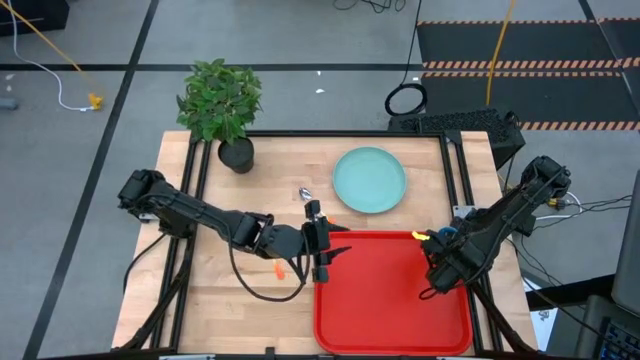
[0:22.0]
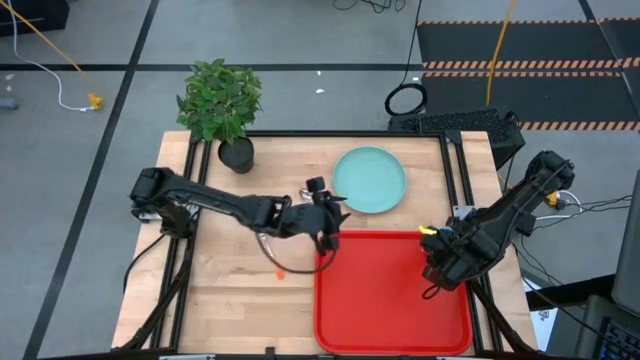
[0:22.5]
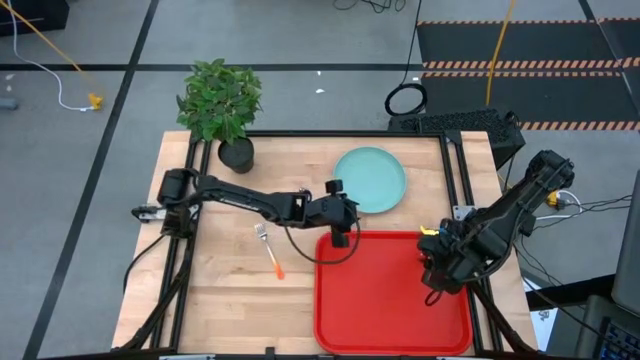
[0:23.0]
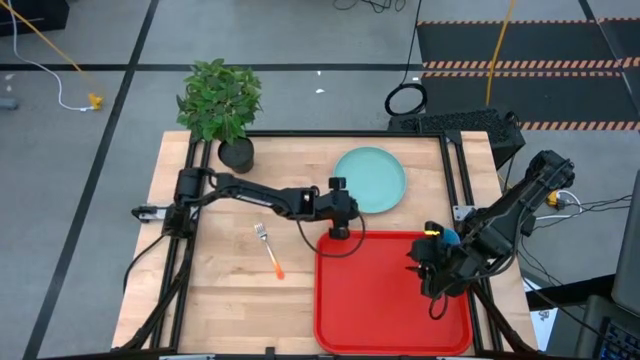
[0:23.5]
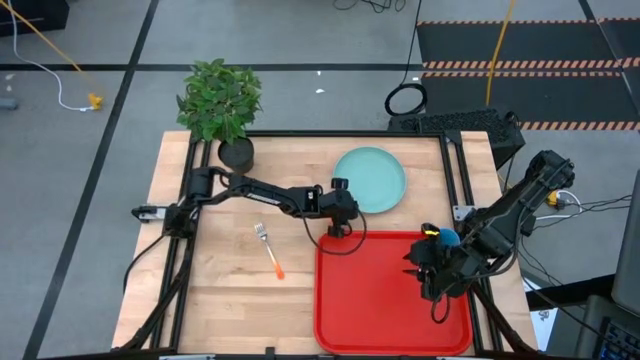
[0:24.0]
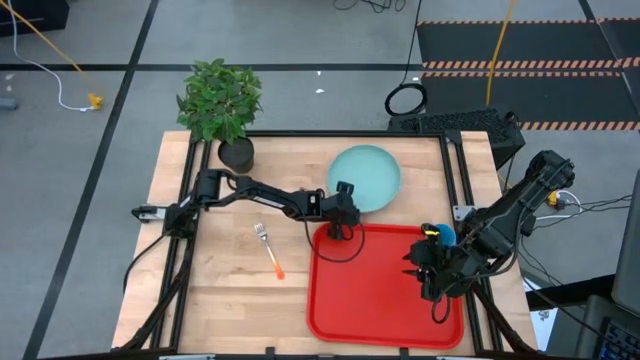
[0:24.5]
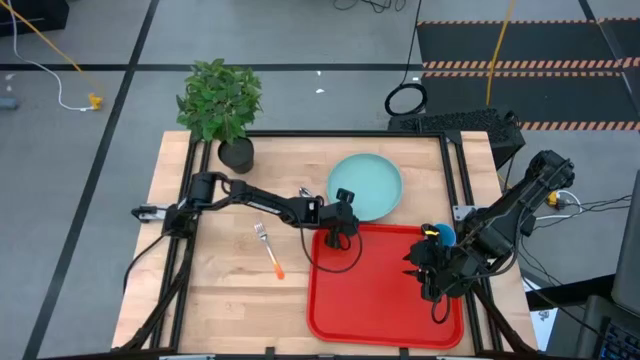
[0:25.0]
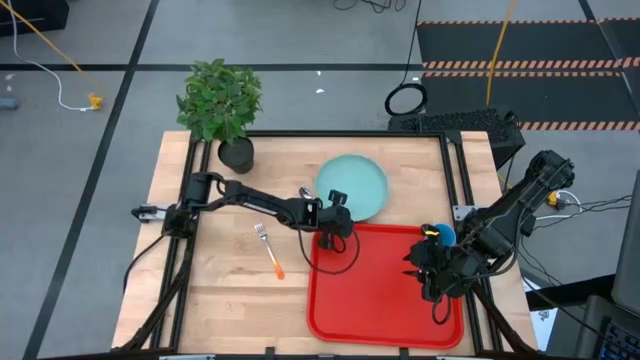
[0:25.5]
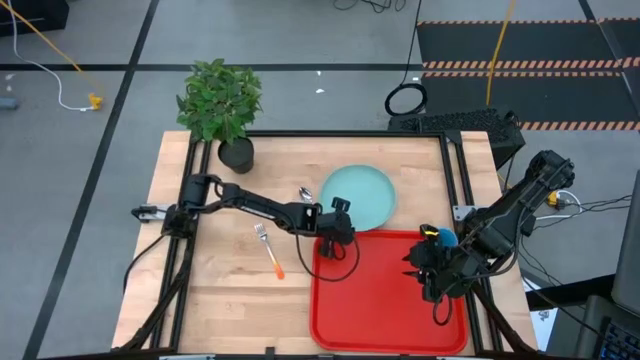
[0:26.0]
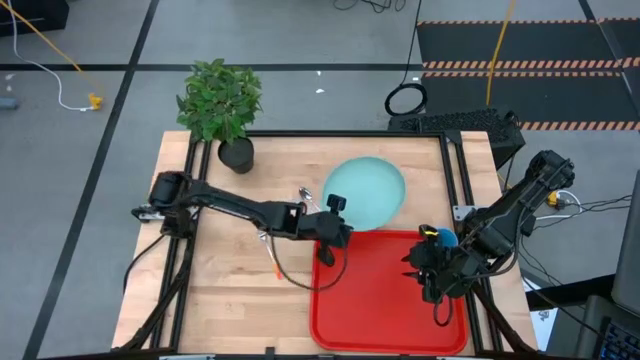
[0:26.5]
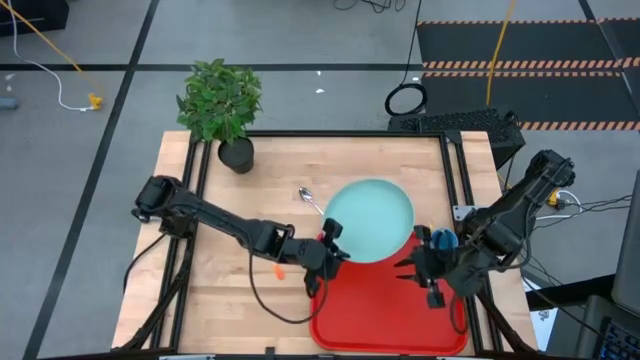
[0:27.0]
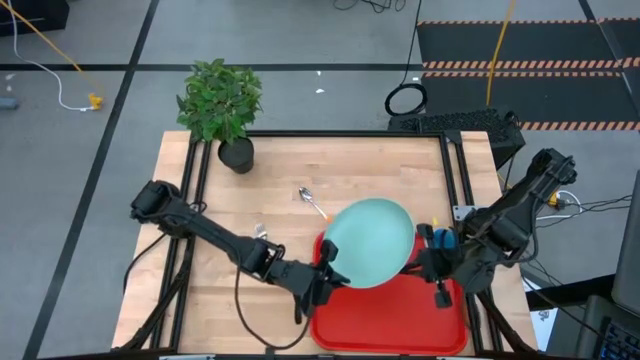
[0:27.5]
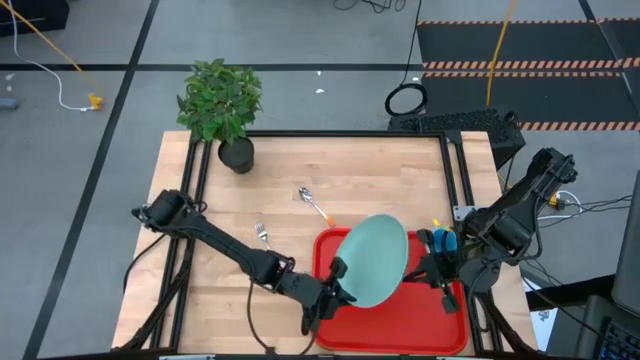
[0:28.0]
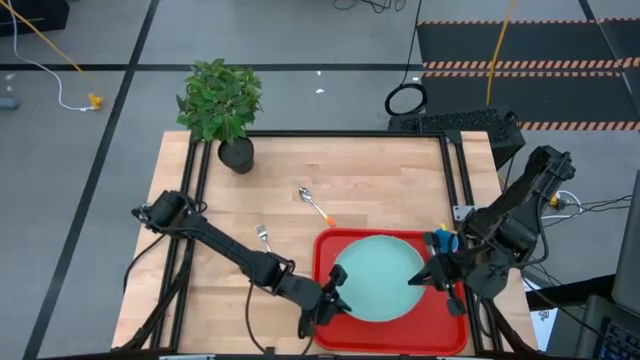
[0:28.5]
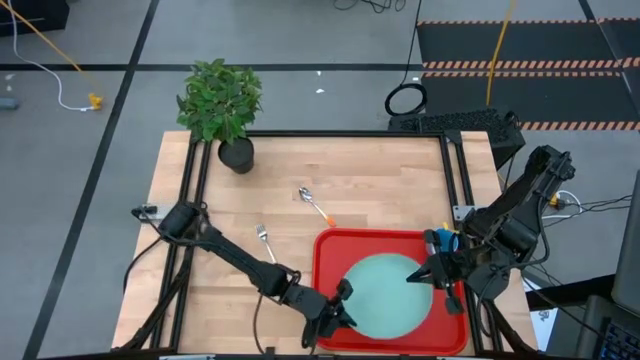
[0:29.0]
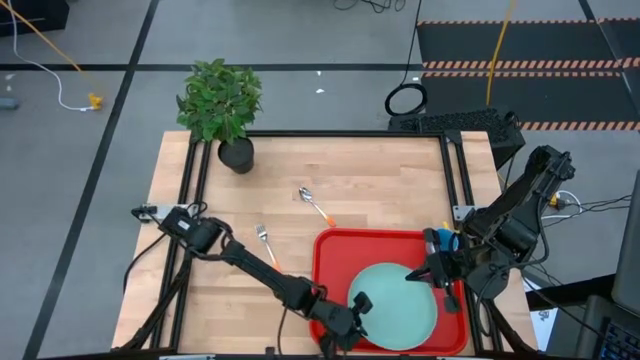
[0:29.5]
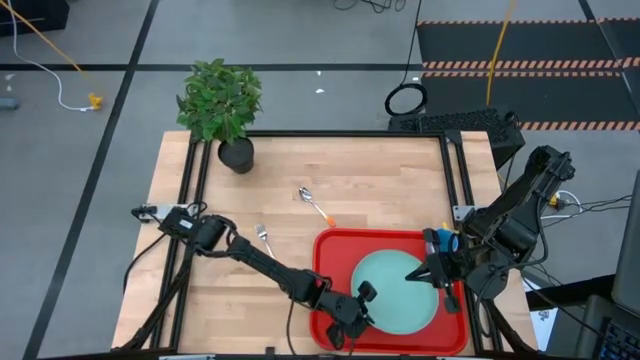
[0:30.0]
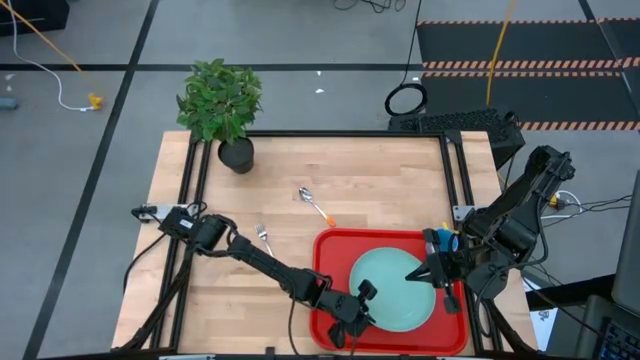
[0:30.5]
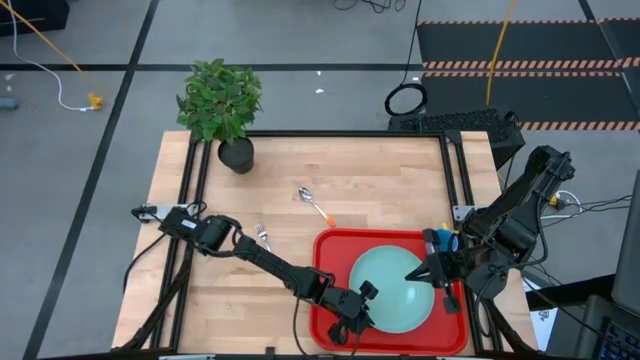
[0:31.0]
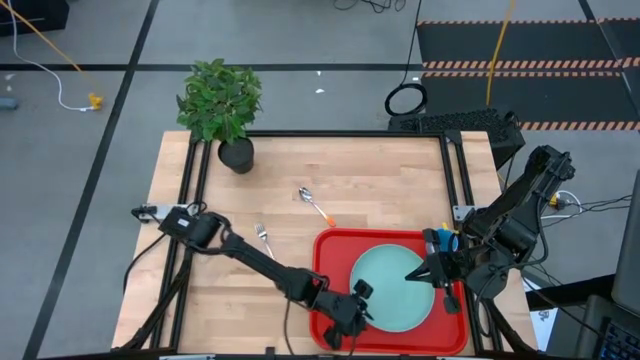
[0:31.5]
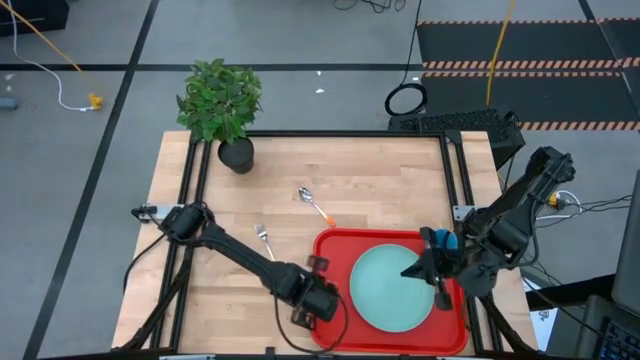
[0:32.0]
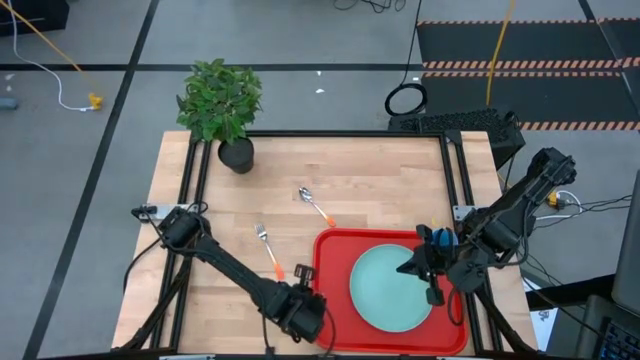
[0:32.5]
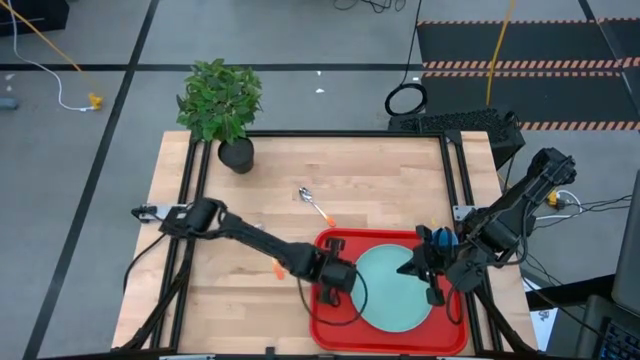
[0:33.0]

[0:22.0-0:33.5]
Task: Pick and place plate/cup/fork/spoon on tray
Put the light blue plate on the red serving tray

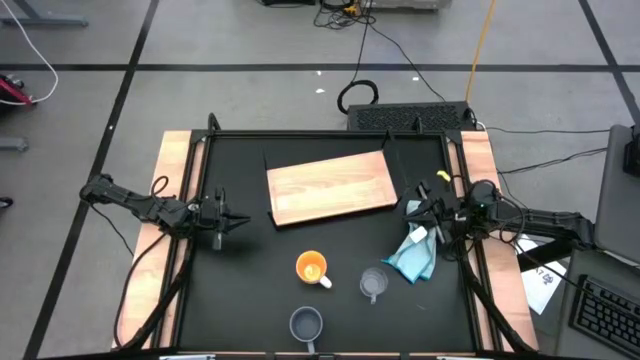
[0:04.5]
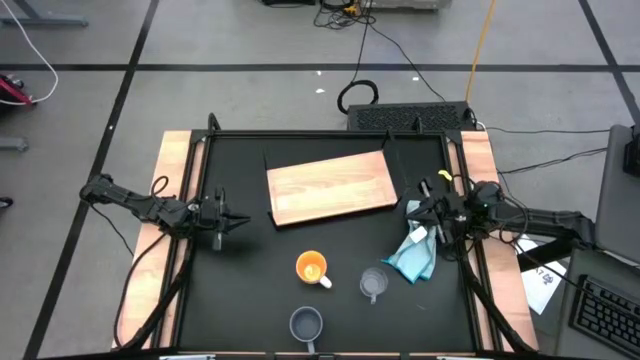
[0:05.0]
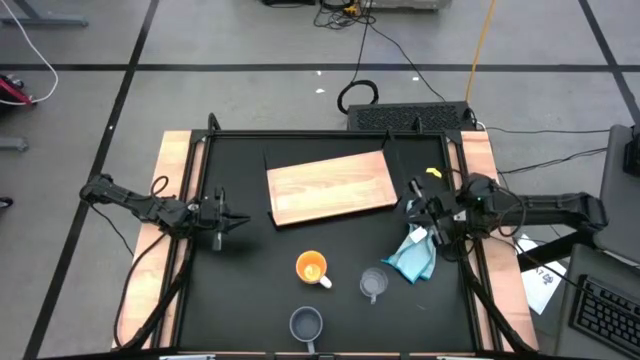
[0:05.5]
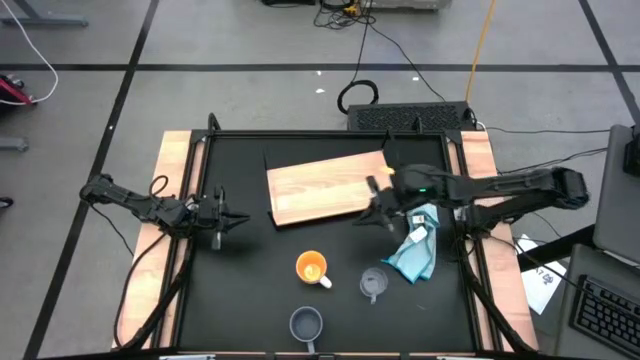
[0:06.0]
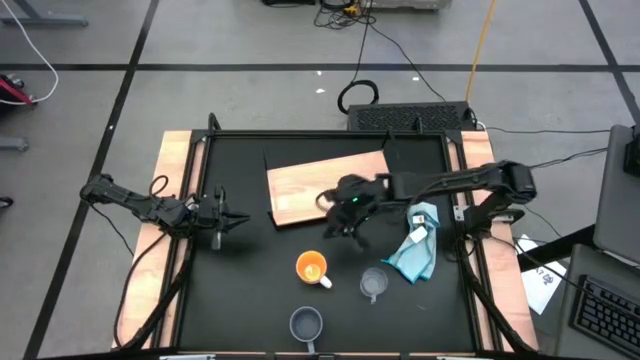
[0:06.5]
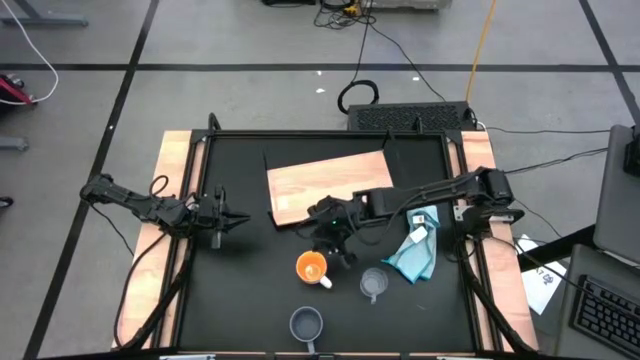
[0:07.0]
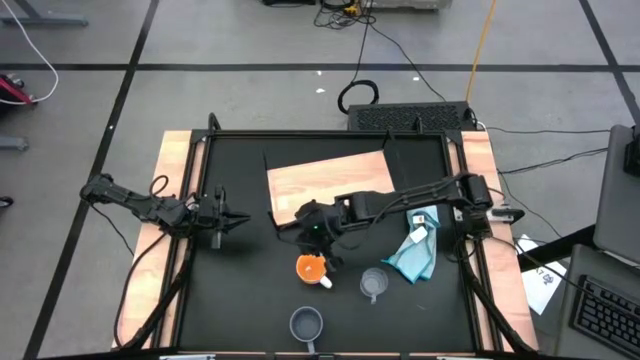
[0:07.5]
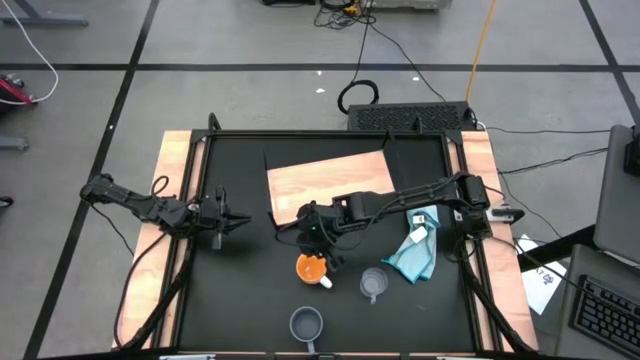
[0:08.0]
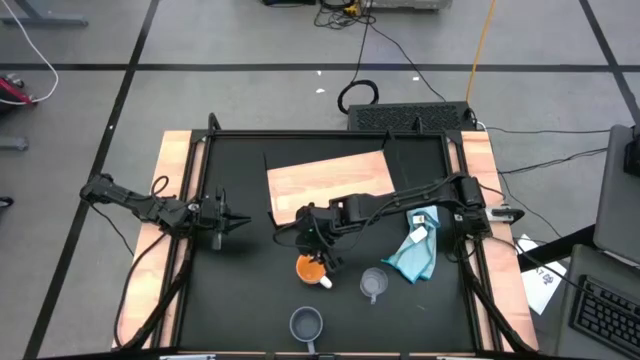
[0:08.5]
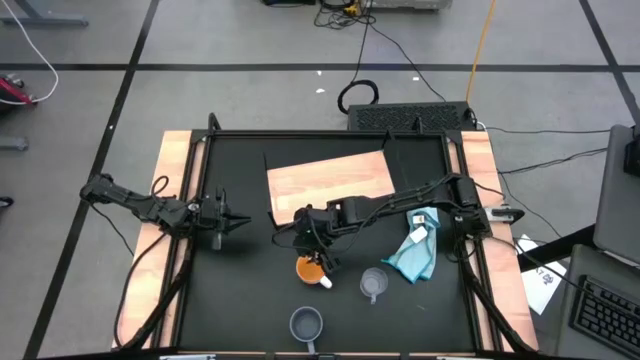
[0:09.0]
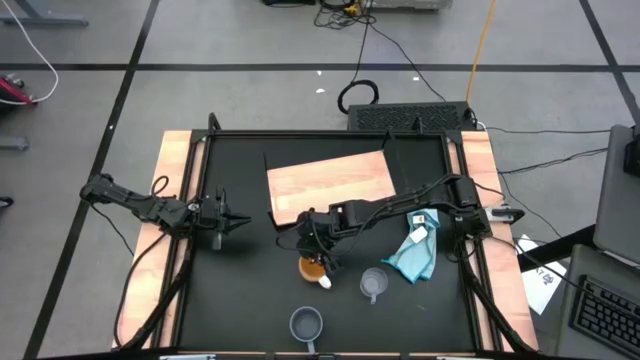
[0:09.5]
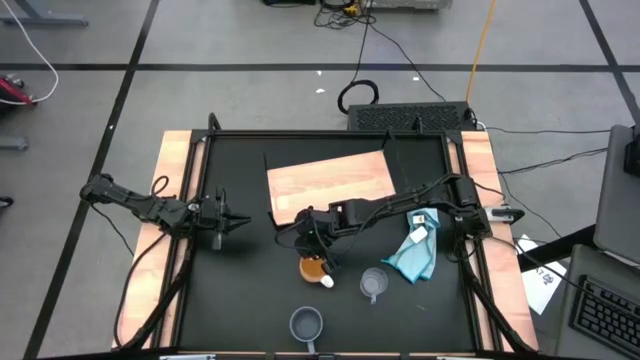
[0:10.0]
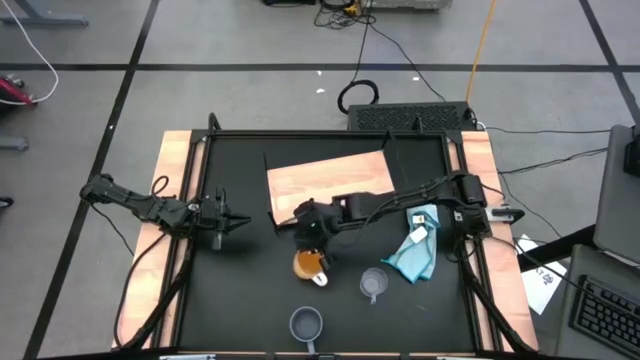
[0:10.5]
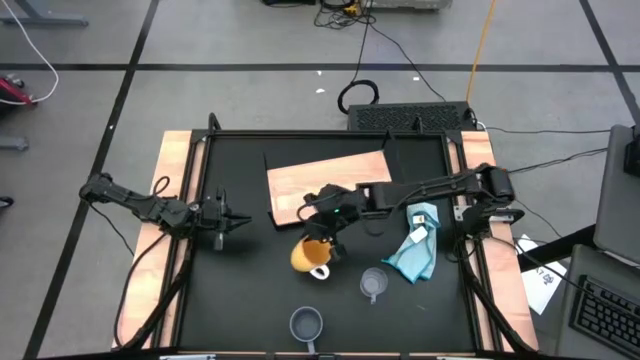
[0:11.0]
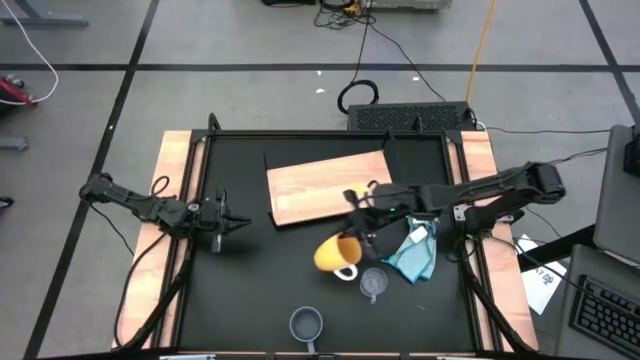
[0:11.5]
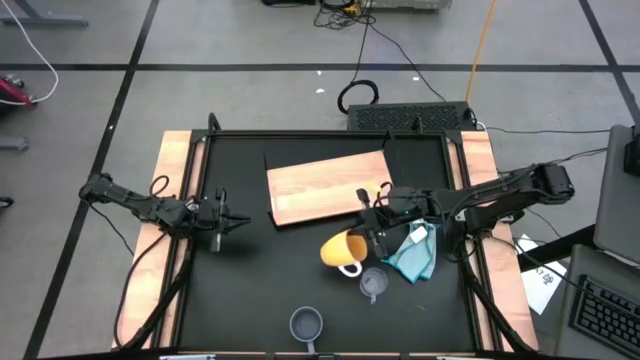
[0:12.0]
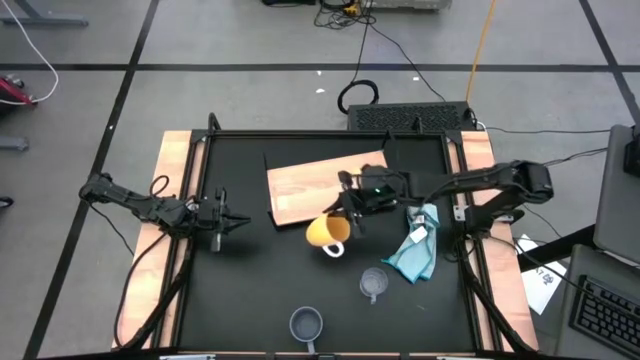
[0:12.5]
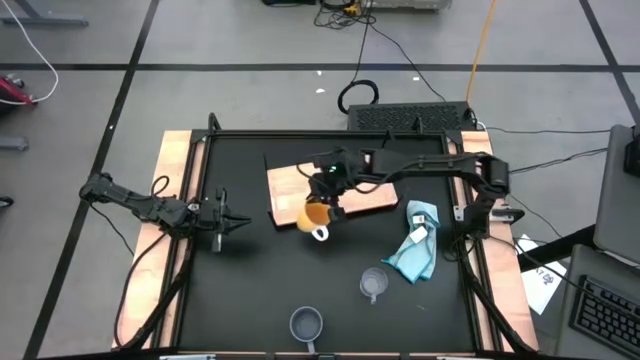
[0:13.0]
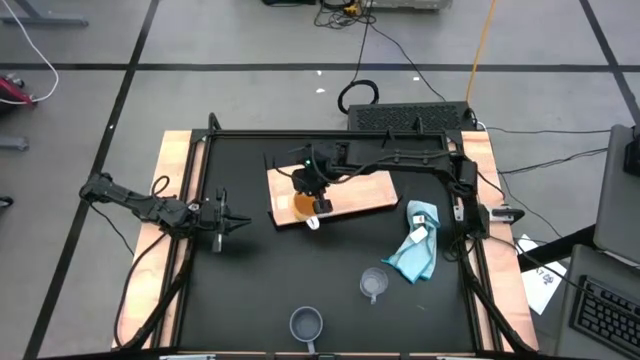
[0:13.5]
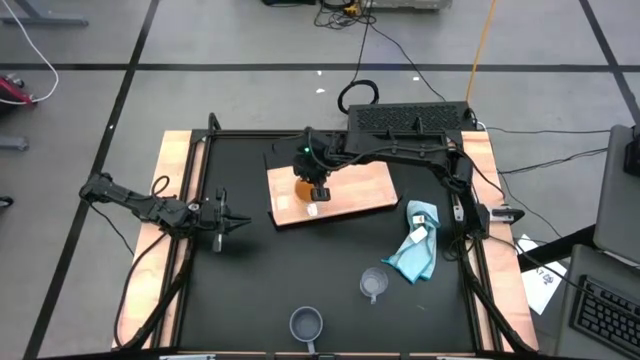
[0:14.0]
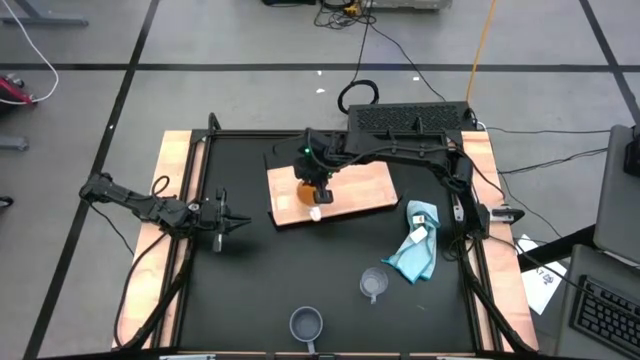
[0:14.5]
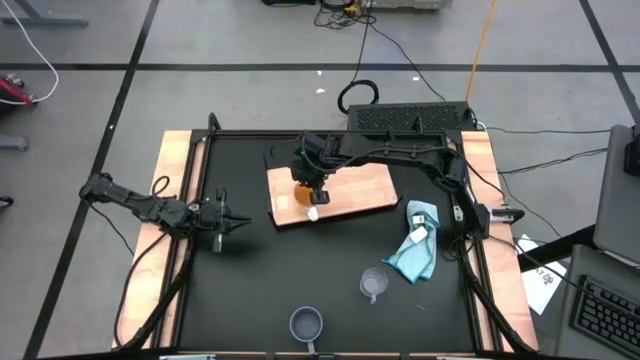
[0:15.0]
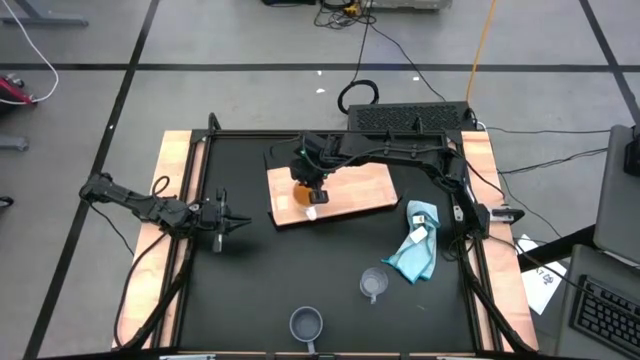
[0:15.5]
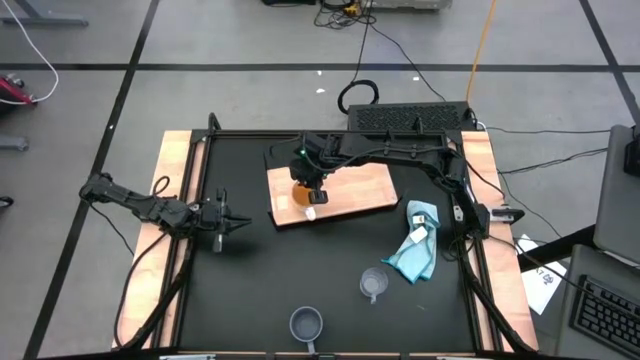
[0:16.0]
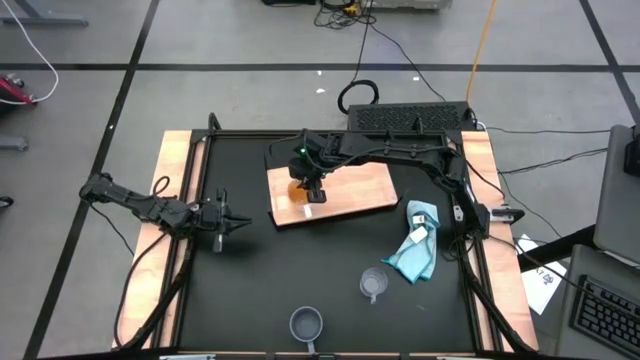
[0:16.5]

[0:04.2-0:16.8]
Task: Stack small to large cups/mugs on shelf
Put the yellow mug on the shelf
